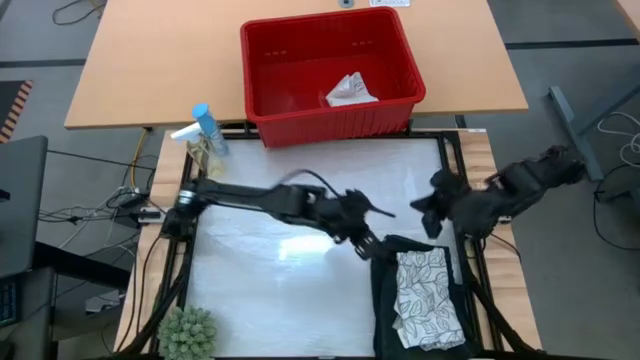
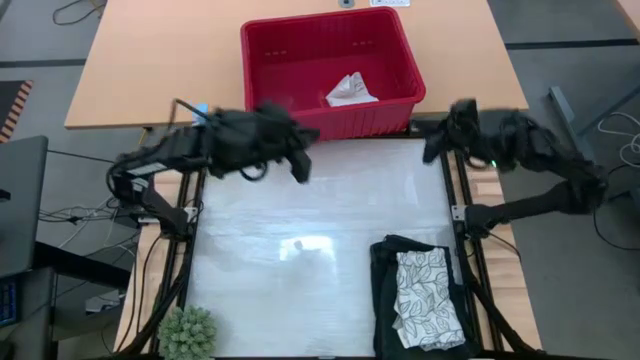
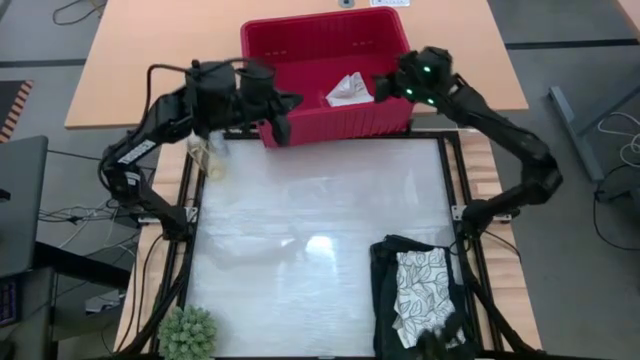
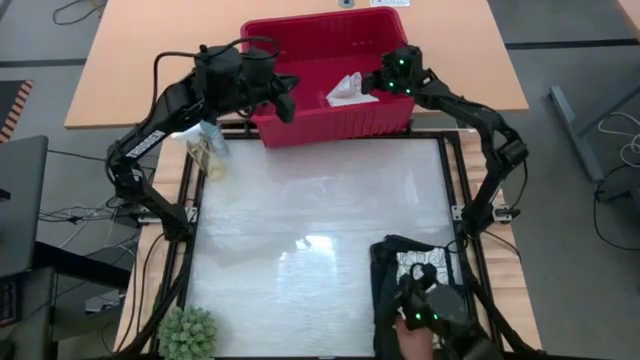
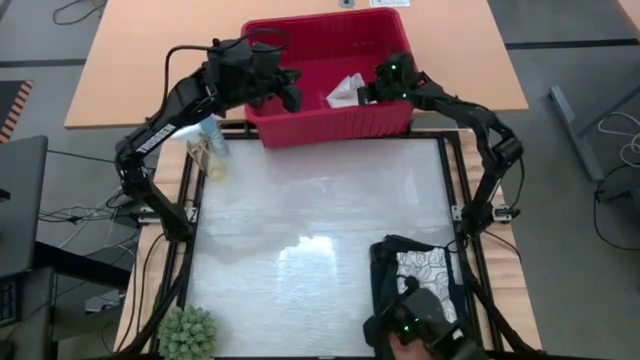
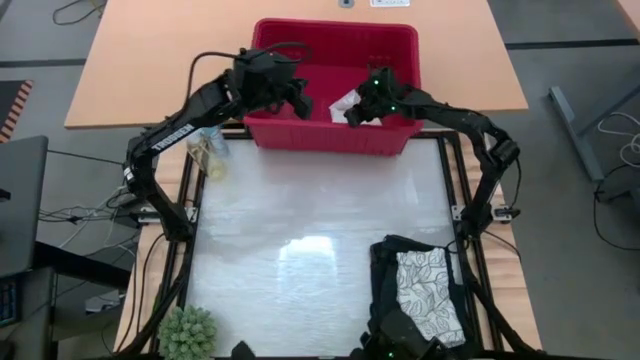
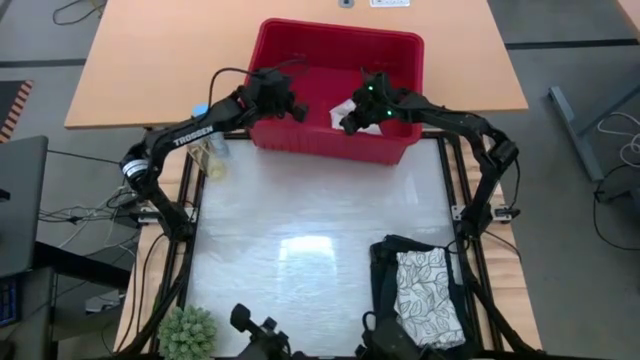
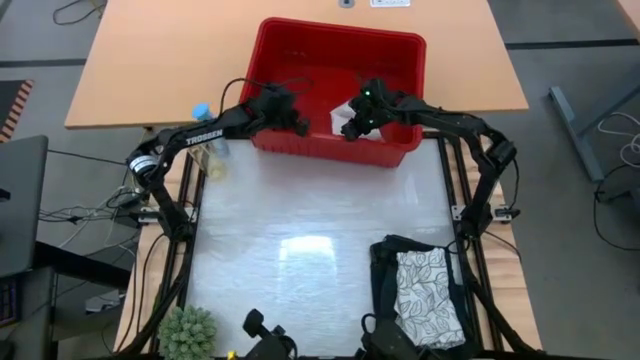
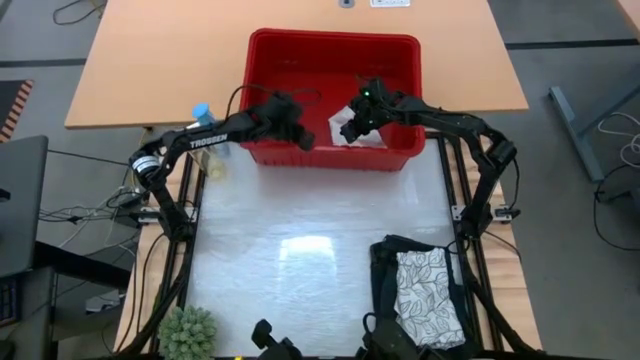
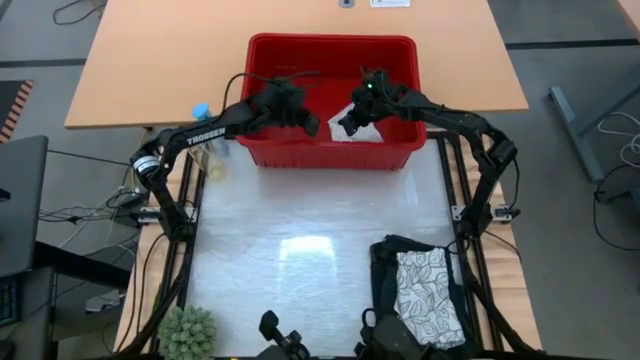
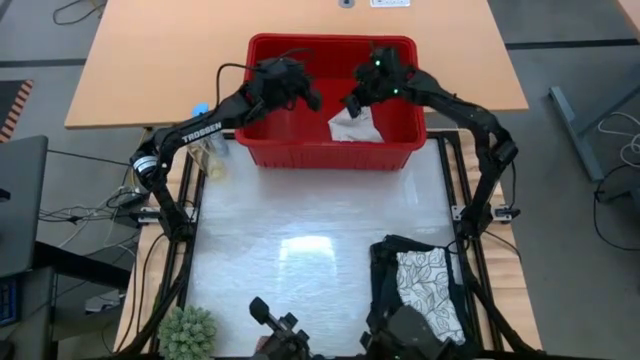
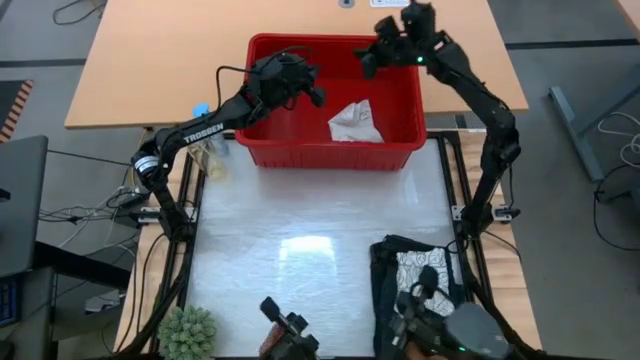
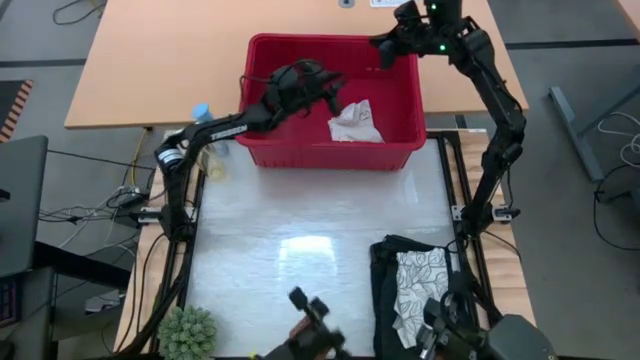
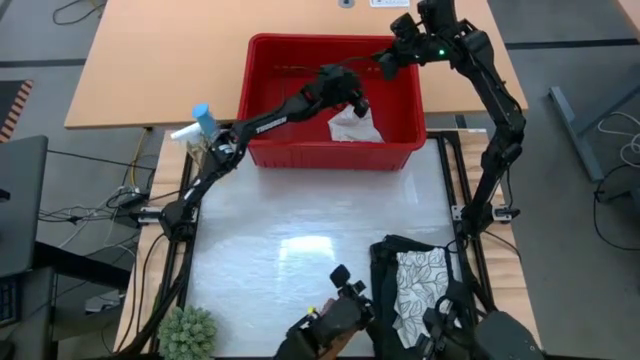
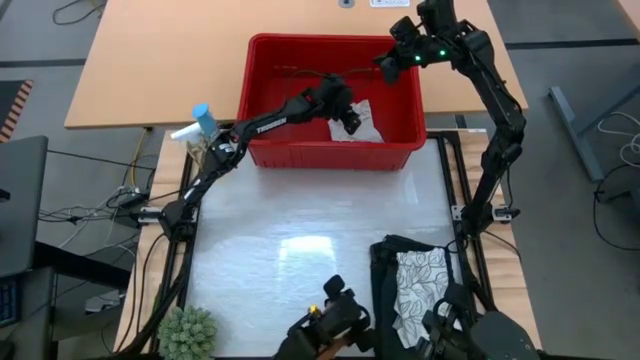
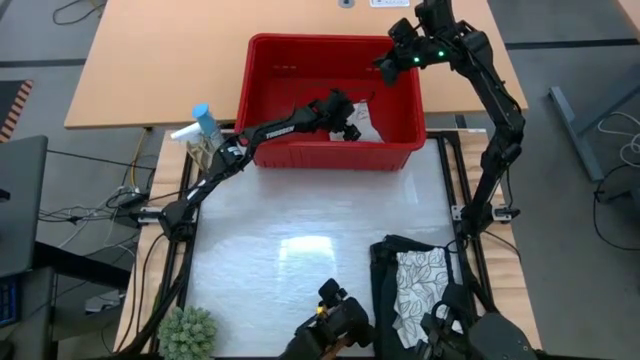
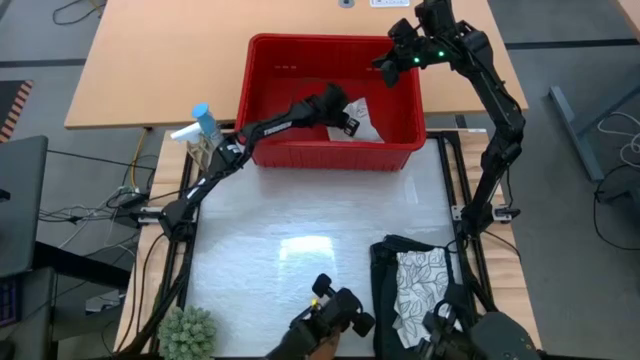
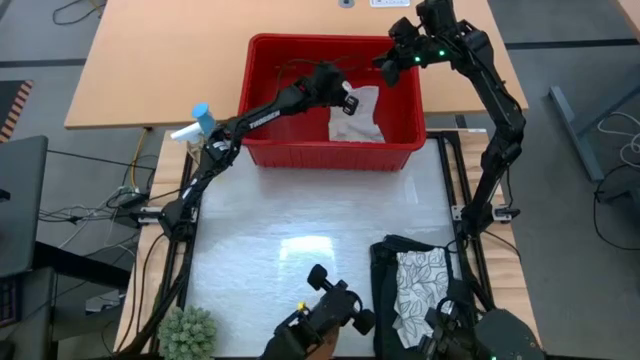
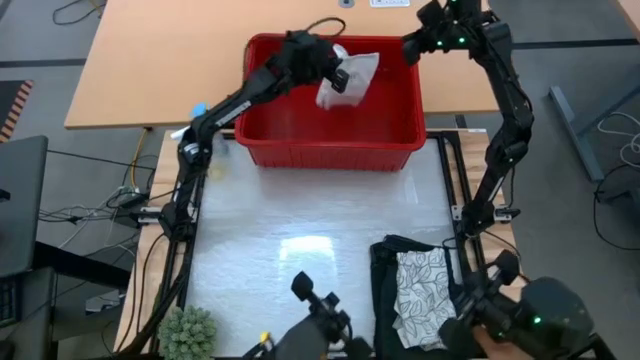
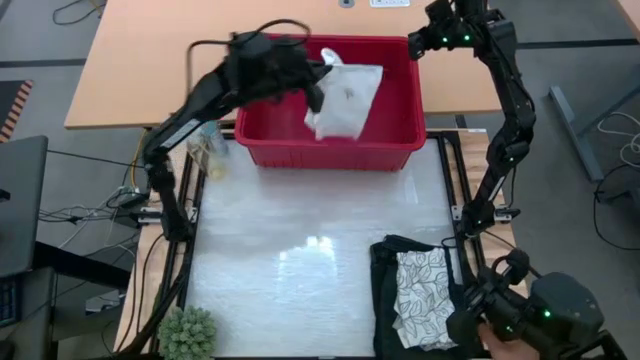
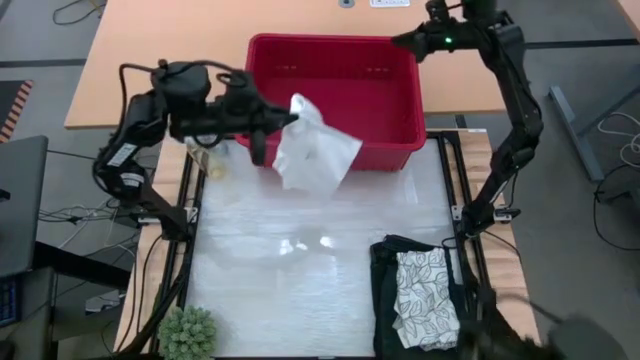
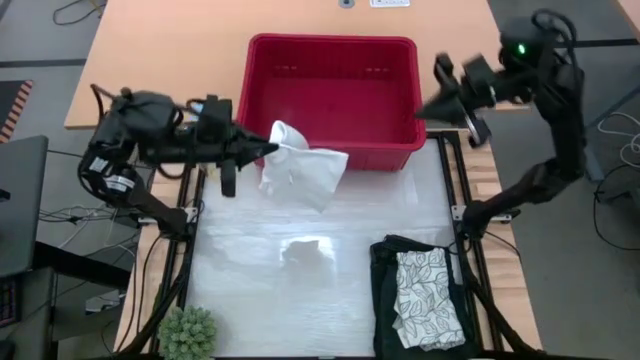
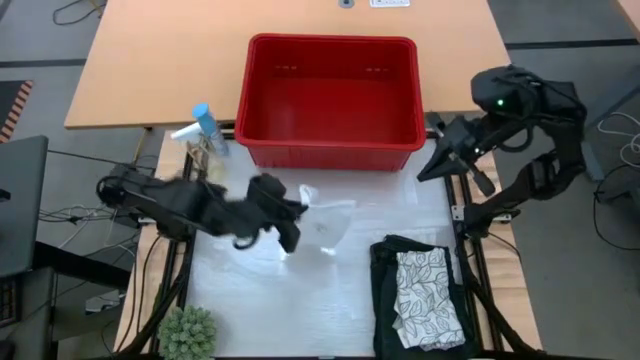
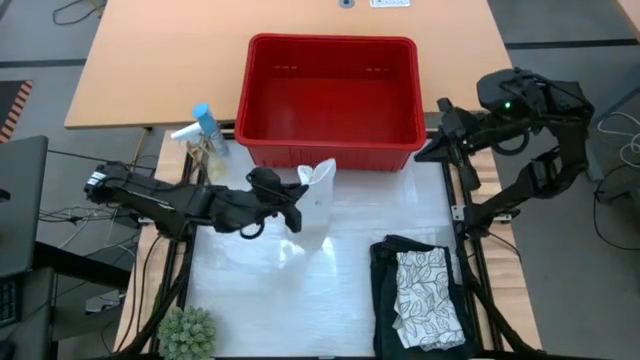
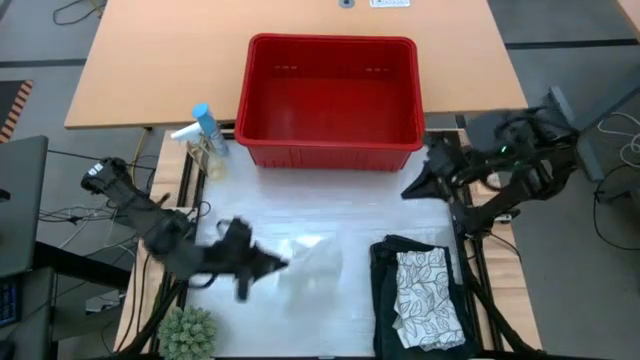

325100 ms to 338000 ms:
Task: Fold Laundry from Bin
Fold the white boxer from the red laundry bin

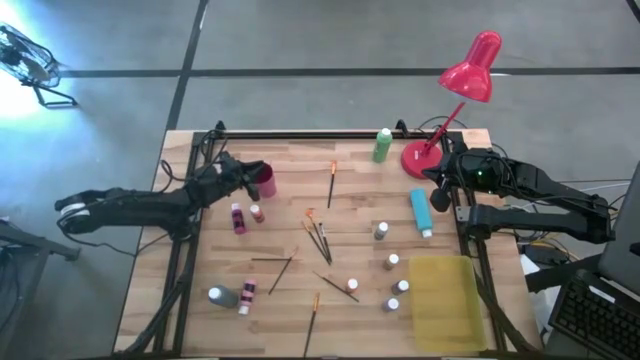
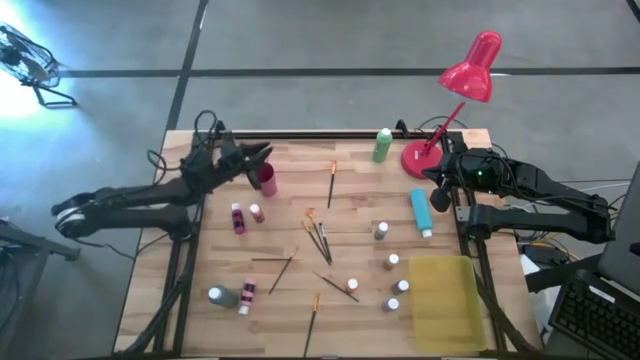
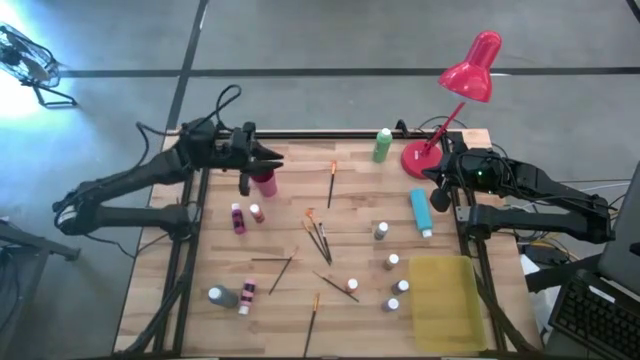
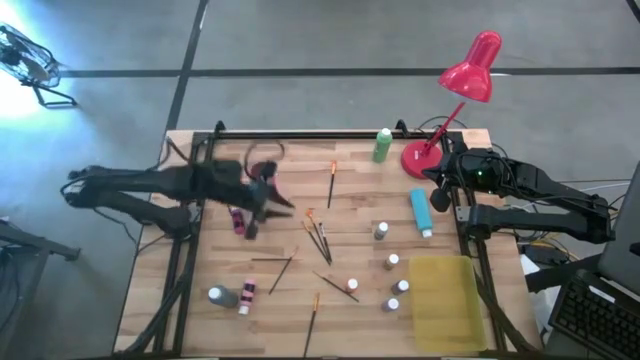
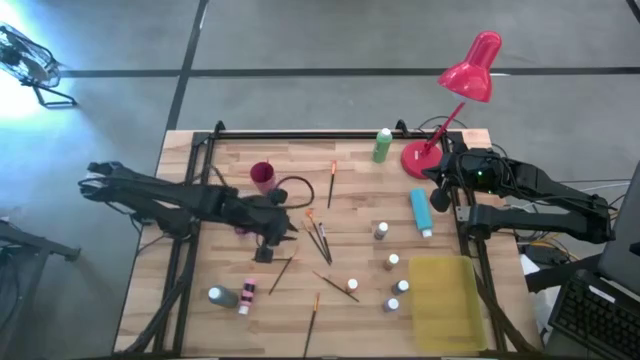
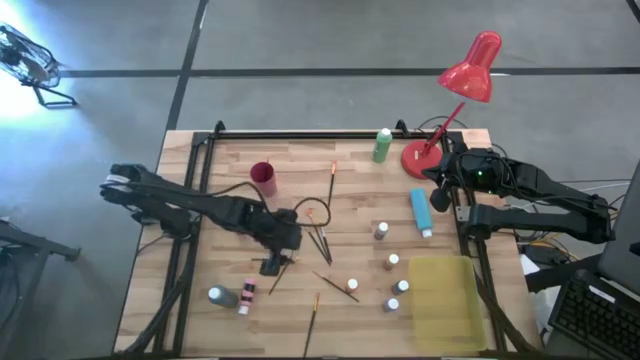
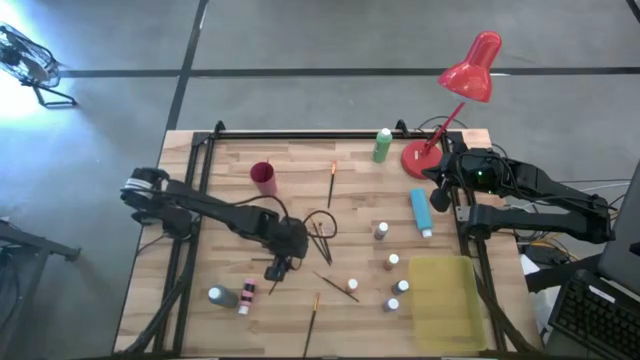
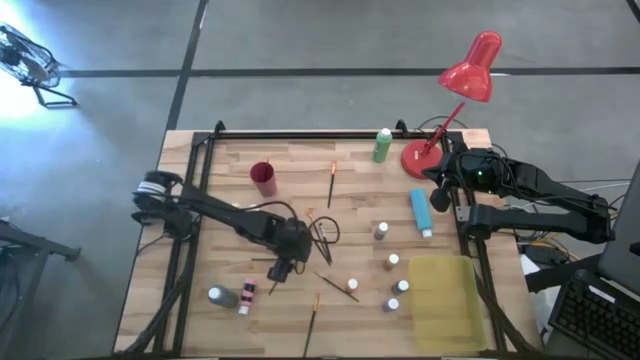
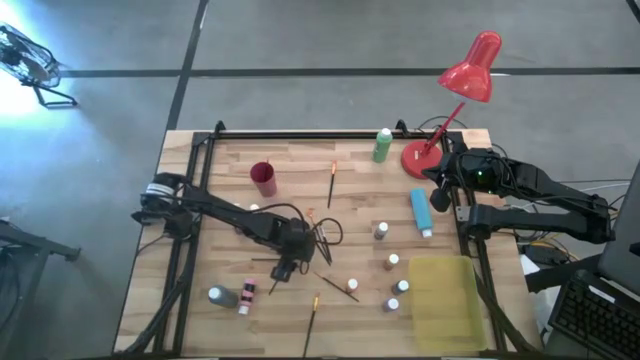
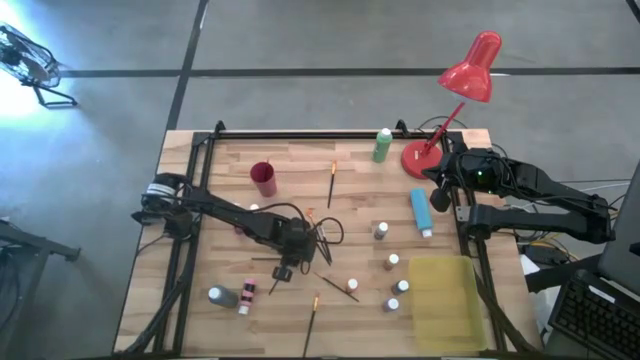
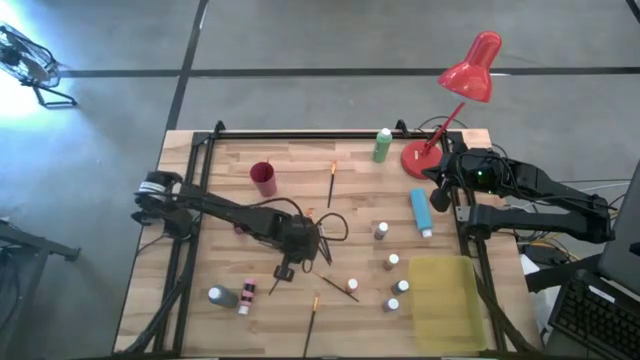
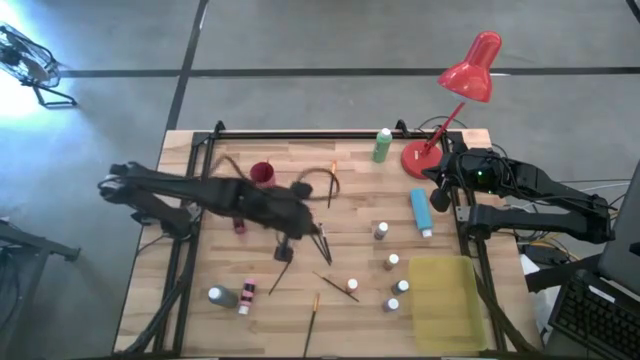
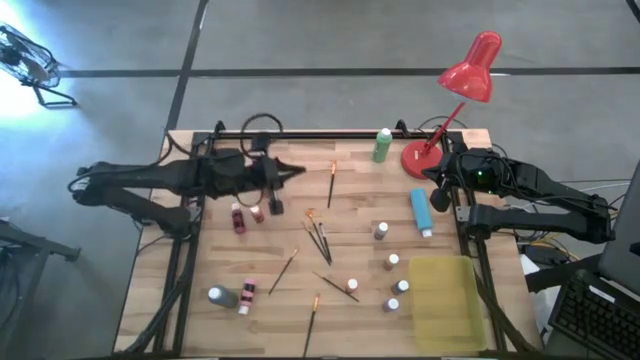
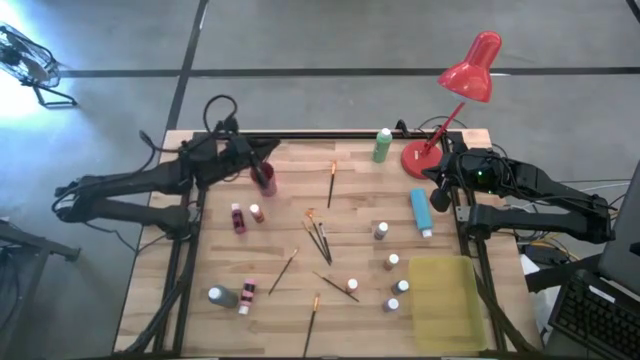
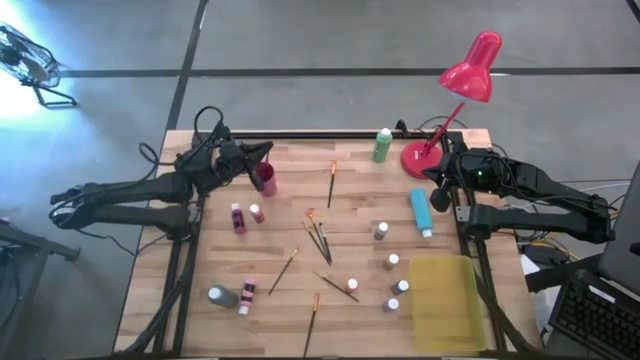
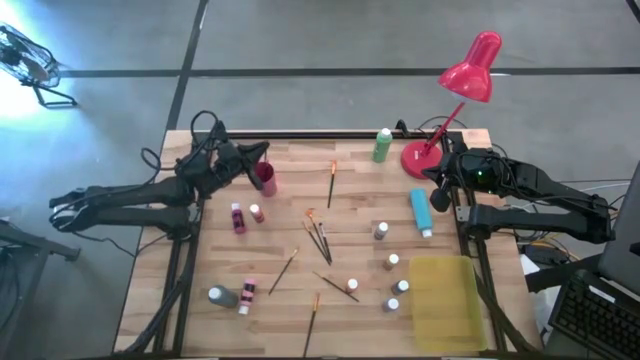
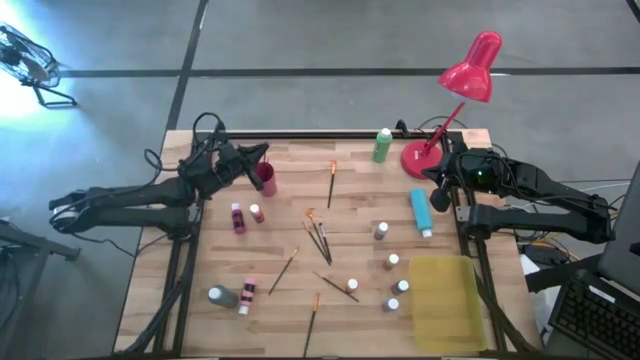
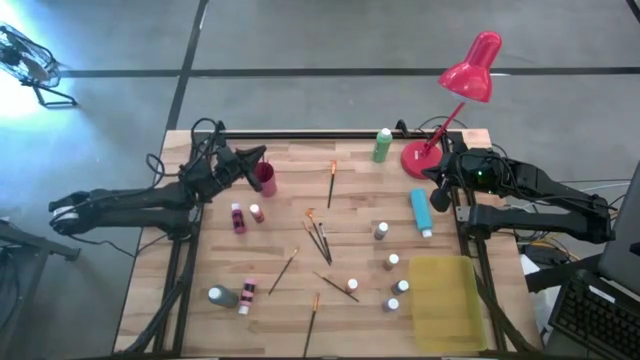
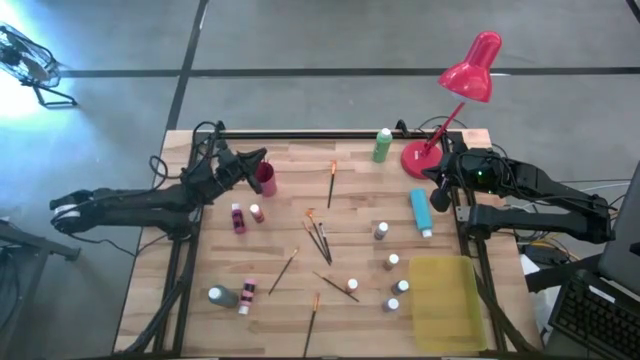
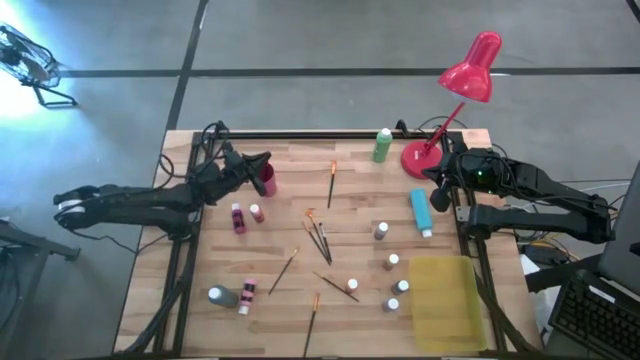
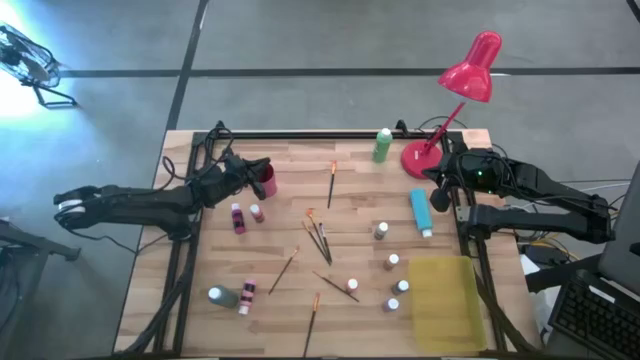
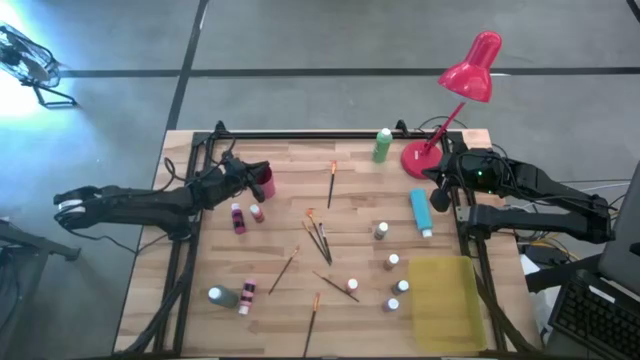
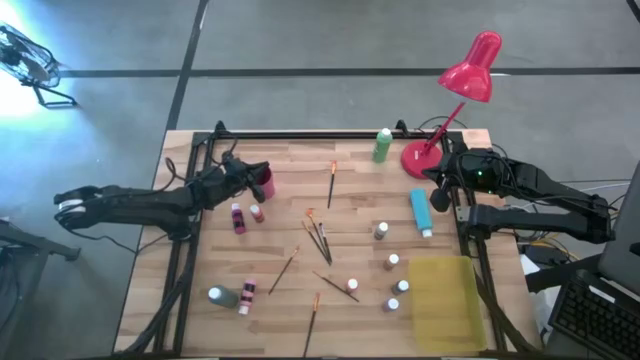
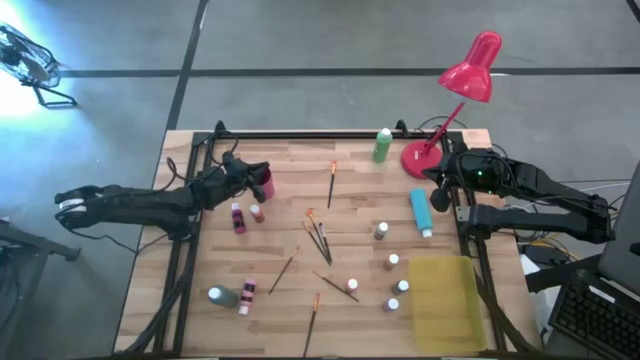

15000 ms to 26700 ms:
Task: Pick & Place Paint Supplies
Put the black paint brush into the pink cup
